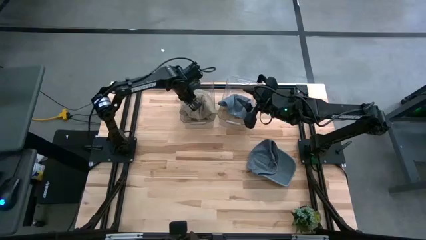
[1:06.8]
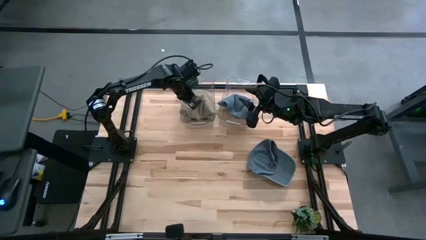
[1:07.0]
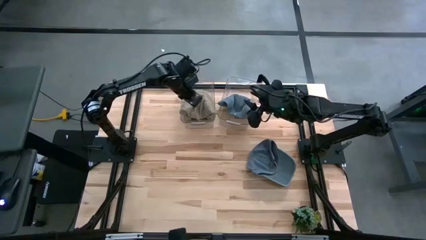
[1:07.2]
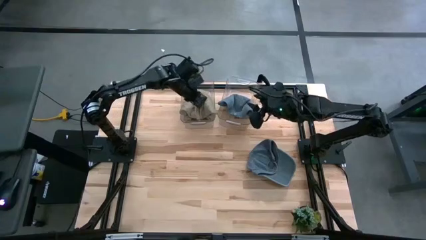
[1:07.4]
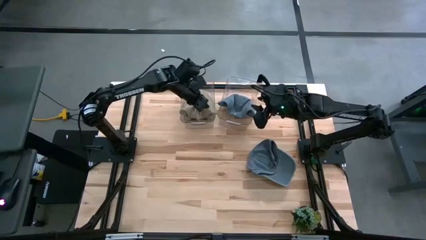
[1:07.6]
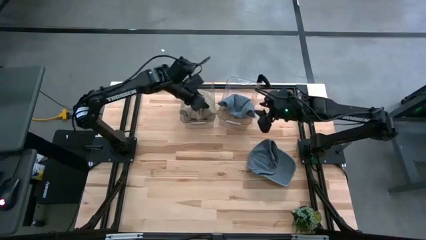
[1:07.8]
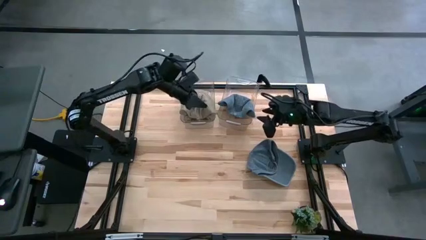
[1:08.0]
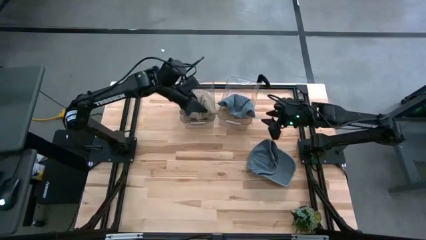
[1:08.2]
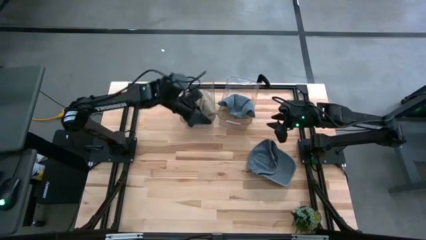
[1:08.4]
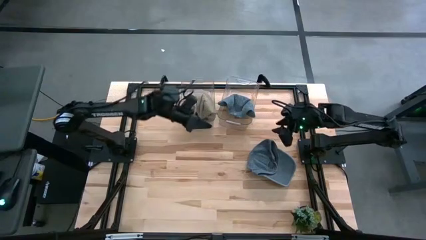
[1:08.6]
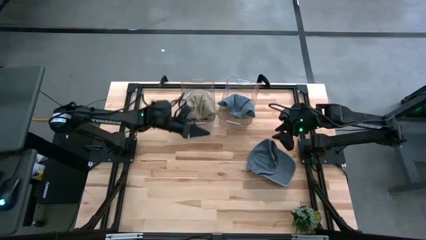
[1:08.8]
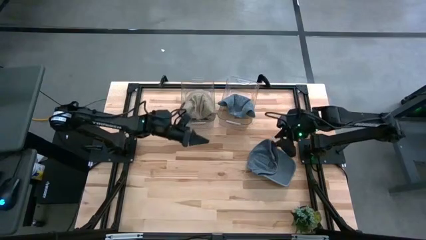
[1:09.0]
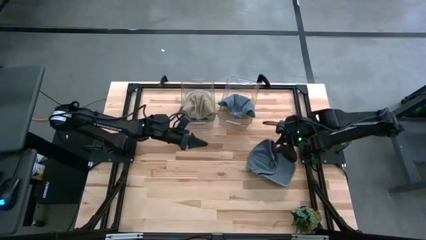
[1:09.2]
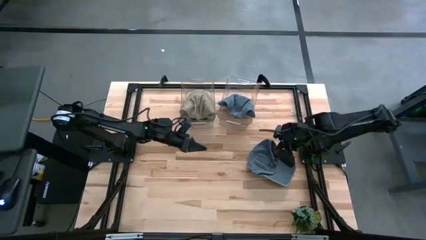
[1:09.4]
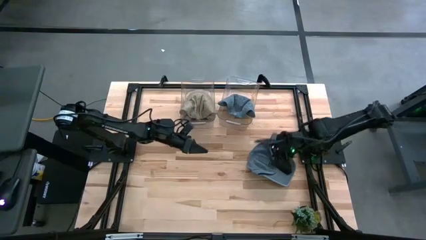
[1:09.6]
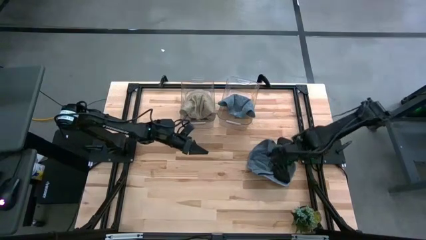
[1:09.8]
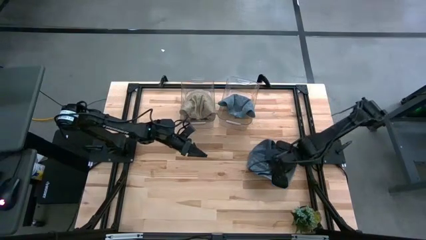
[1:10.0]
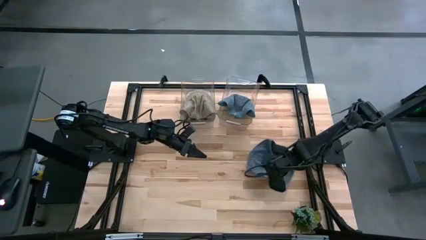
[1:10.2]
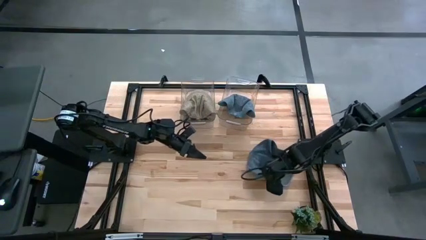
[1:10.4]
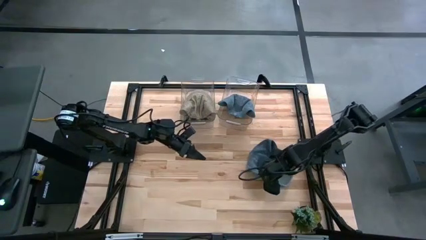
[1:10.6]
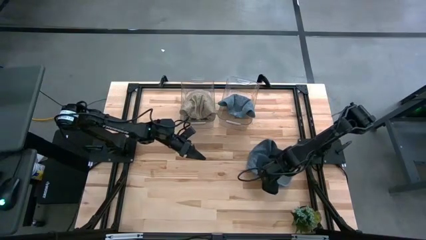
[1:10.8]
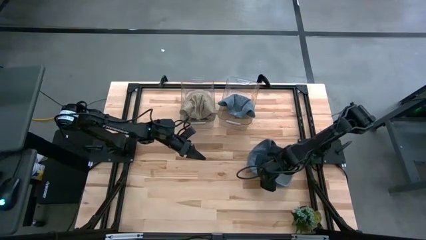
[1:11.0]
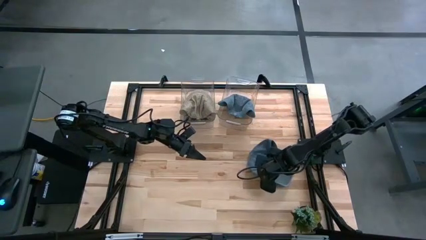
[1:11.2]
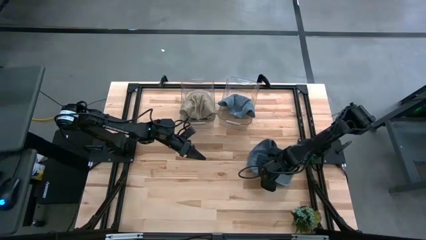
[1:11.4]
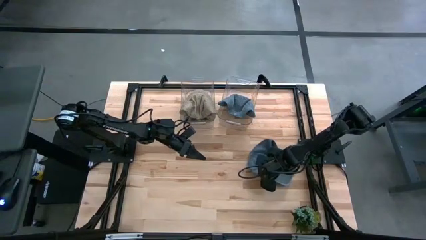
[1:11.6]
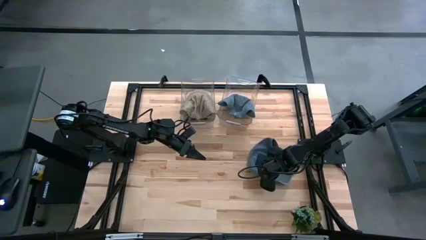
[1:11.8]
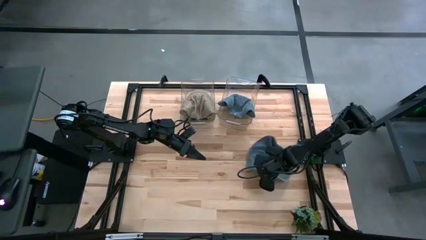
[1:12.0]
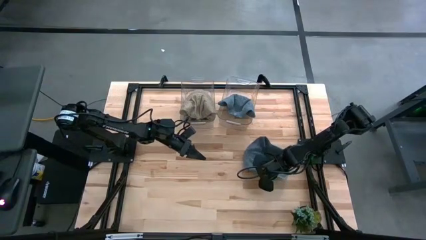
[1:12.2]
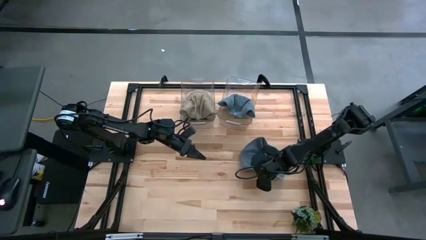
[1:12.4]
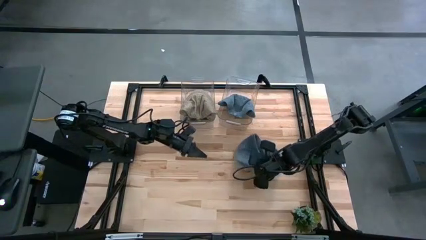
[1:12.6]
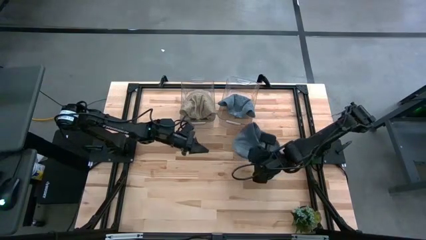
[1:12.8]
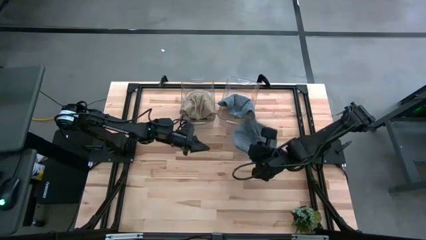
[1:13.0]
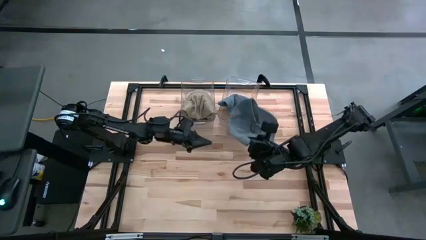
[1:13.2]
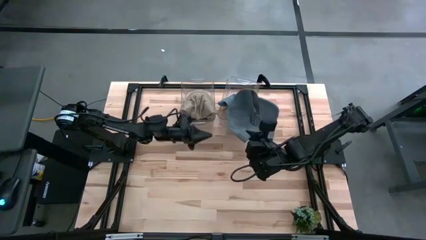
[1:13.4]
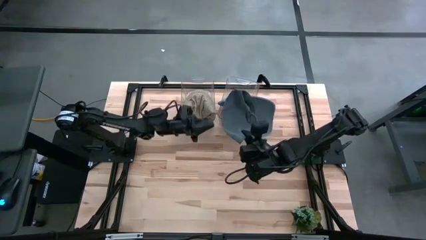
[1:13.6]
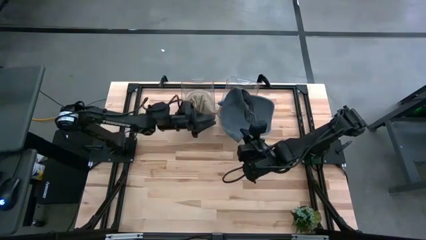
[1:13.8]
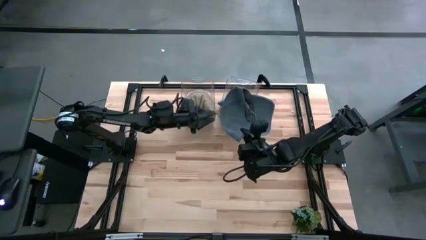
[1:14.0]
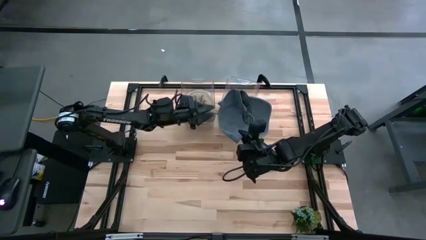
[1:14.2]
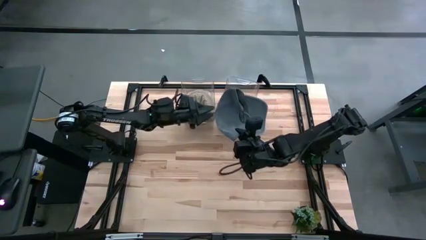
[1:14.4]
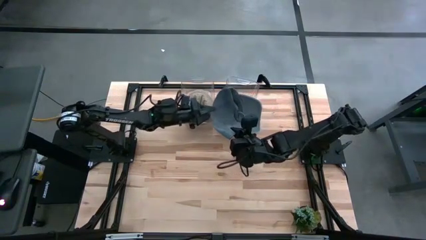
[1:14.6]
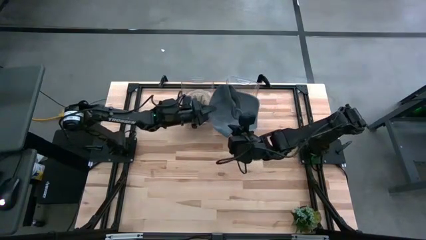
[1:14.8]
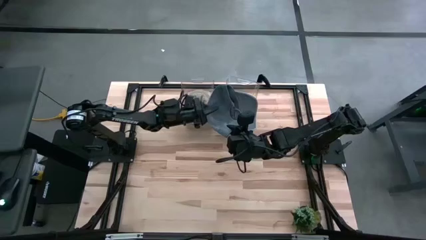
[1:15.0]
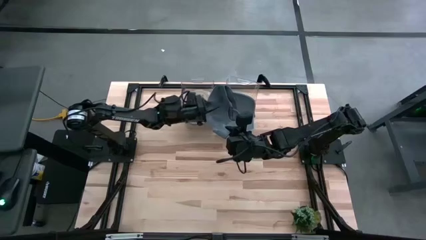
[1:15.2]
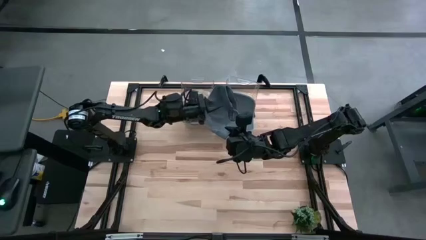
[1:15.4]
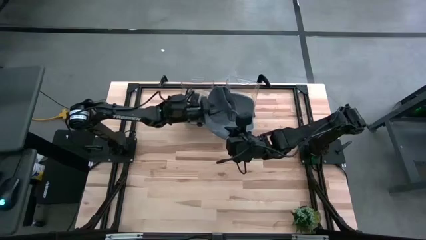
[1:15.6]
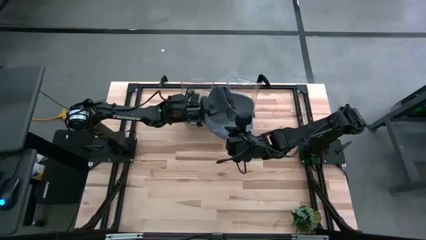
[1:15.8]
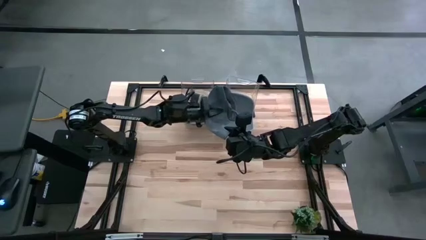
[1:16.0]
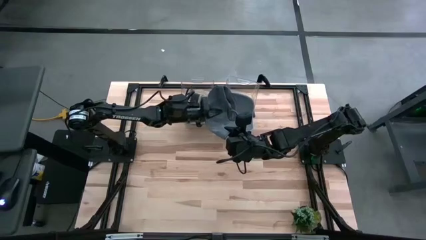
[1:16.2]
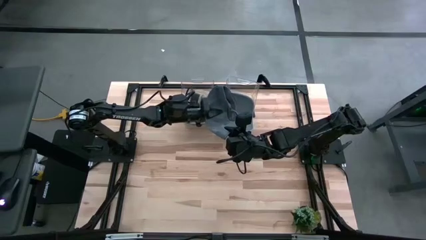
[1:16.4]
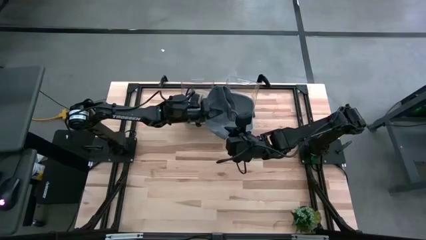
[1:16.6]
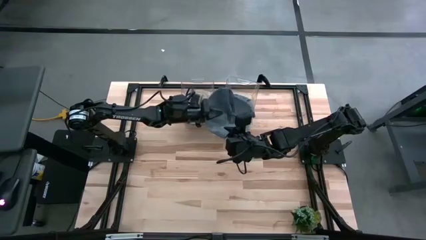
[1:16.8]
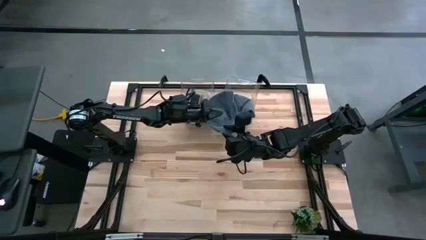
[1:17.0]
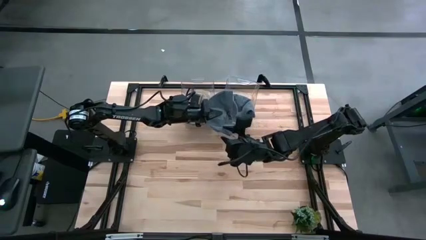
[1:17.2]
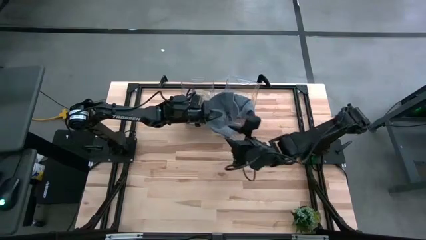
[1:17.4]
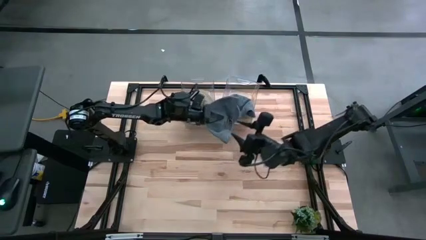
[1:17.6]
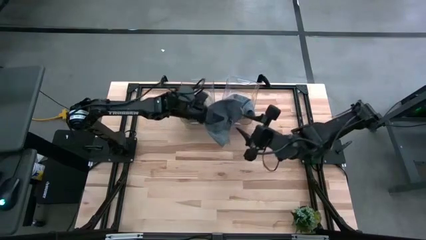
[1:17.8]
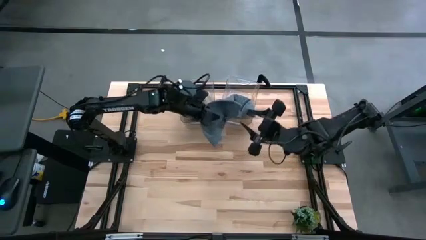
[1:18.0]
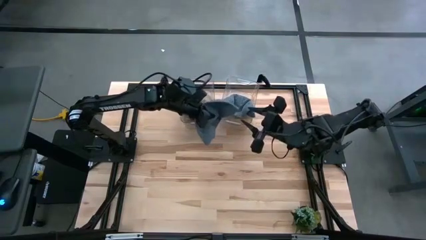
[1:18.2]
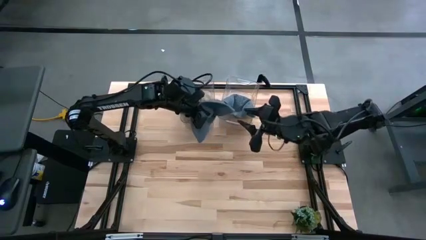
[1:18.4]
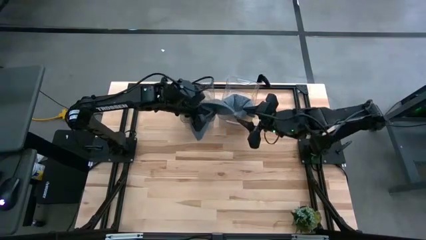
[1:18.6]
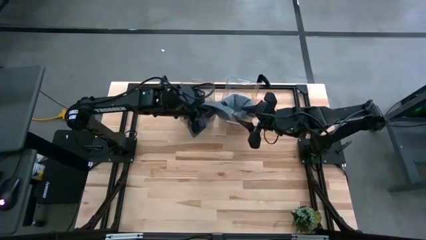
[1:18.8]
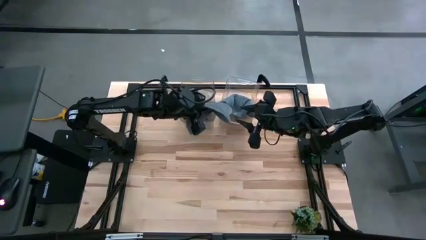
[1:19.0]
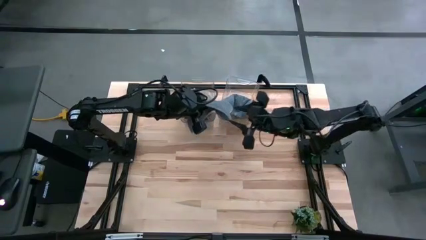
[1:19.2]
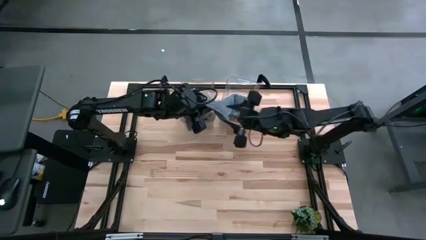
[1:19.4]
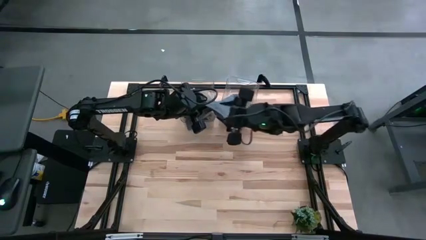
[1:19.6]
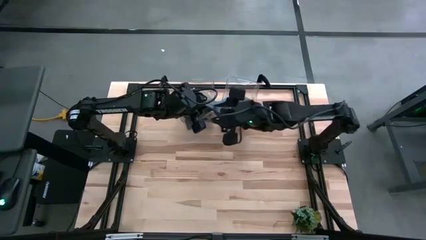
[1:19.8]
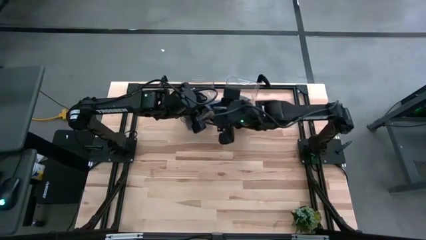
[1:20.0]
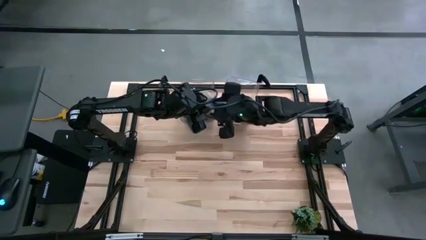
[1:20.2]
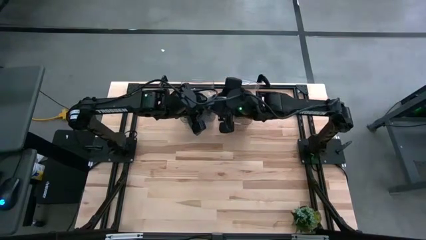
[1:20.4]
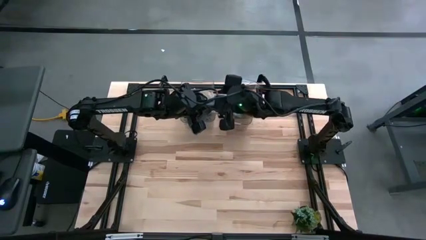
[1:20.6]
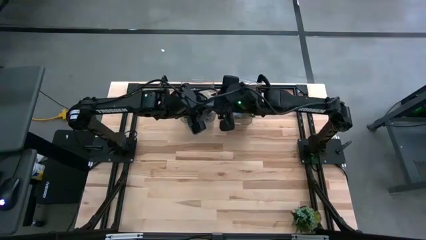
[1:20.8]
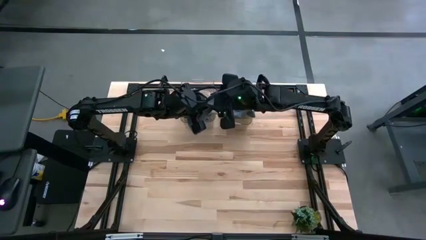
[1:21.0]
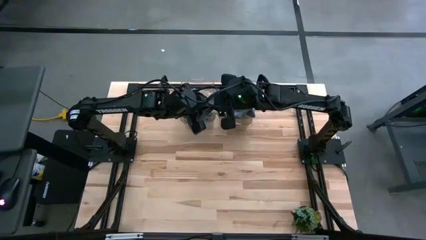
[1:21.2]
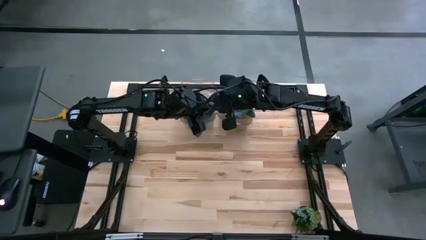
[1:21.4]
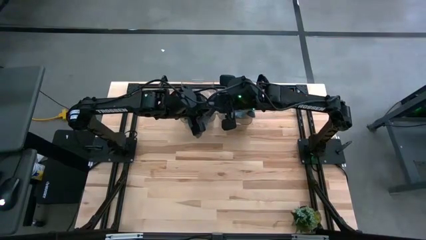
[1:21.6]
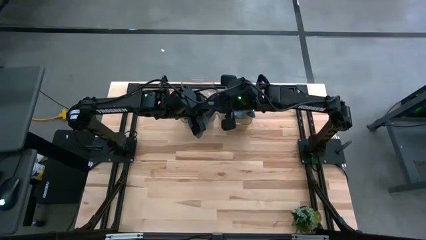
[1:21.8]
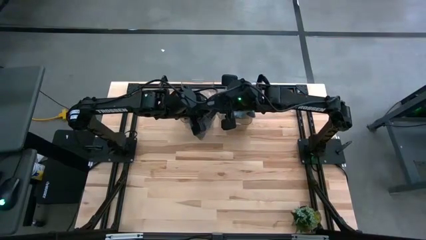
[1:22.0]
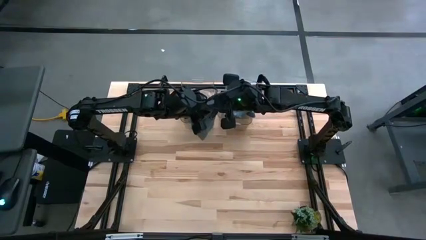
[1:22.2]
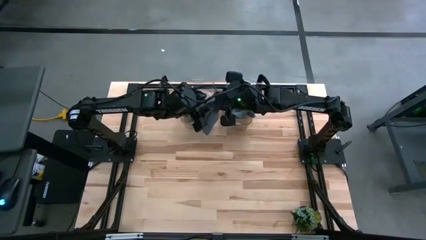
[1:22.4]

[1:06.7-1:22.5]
Task: Pick & Place hat
Put the blue cap into the right transparent bin
